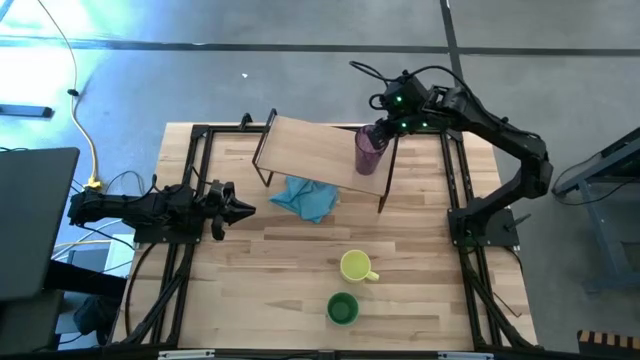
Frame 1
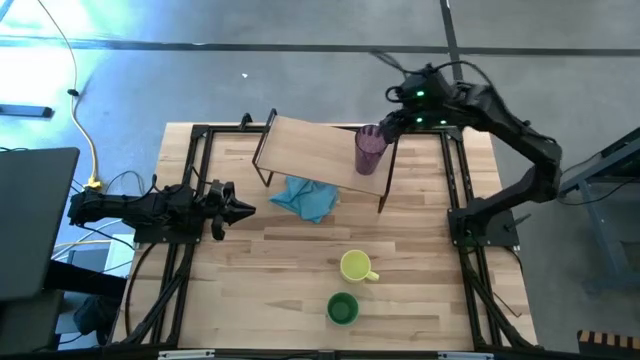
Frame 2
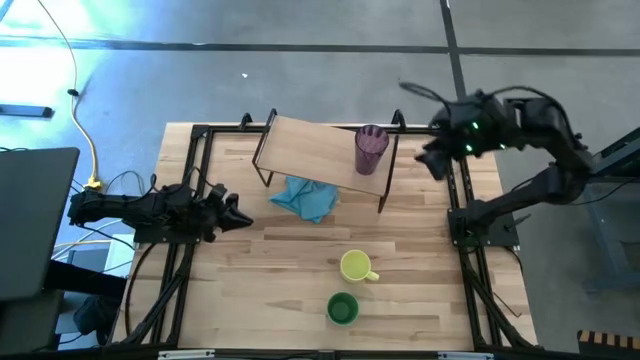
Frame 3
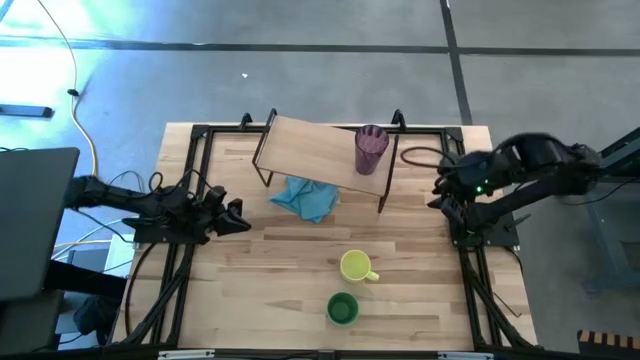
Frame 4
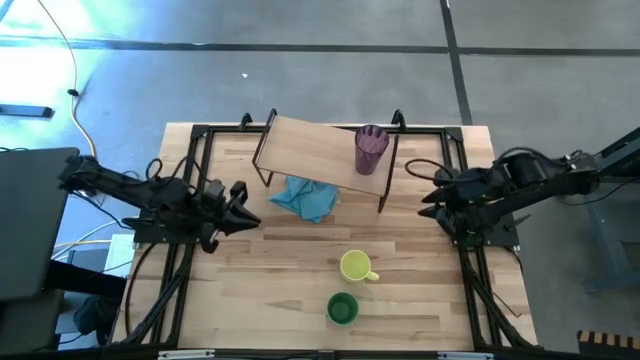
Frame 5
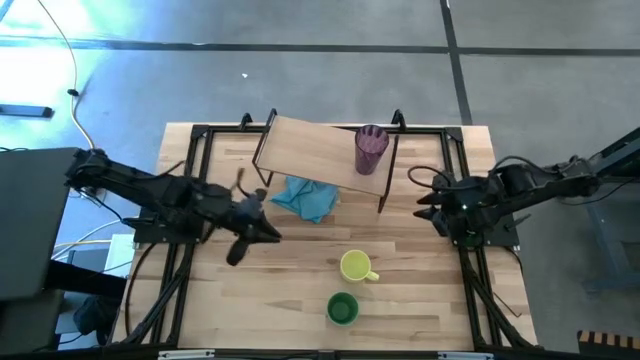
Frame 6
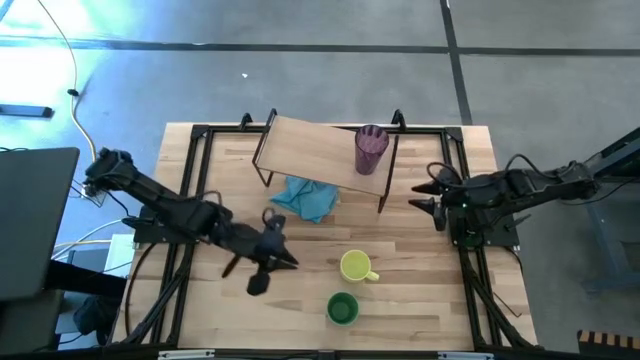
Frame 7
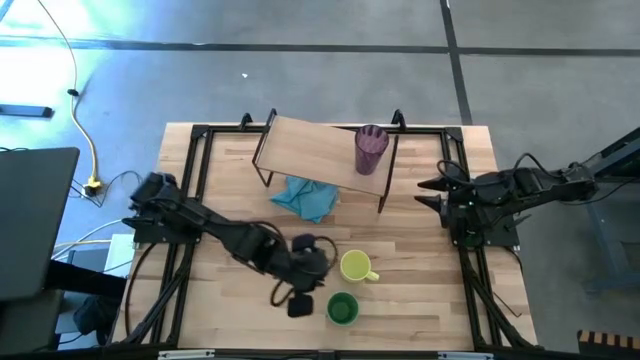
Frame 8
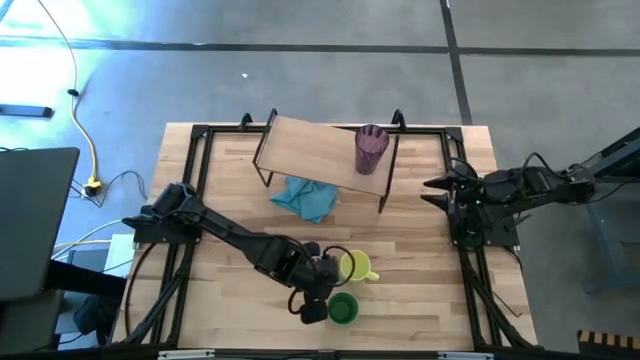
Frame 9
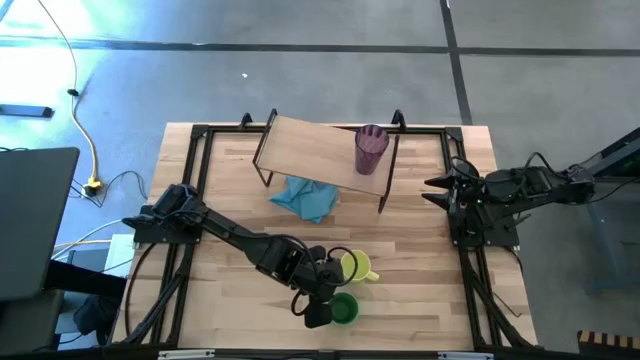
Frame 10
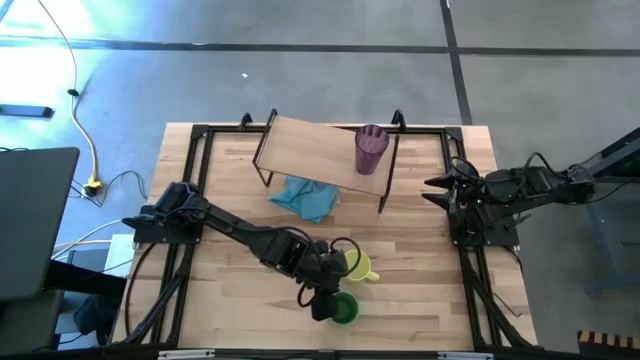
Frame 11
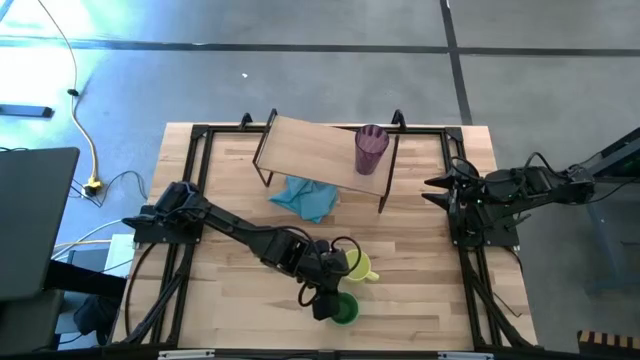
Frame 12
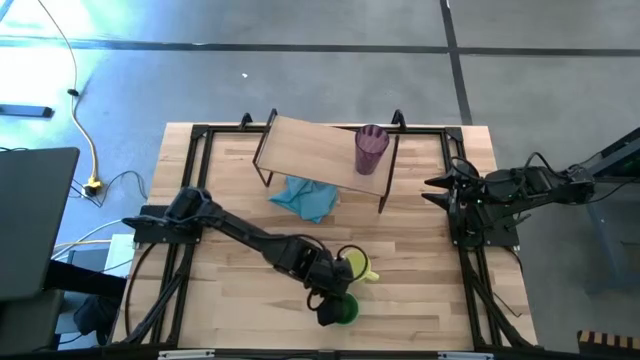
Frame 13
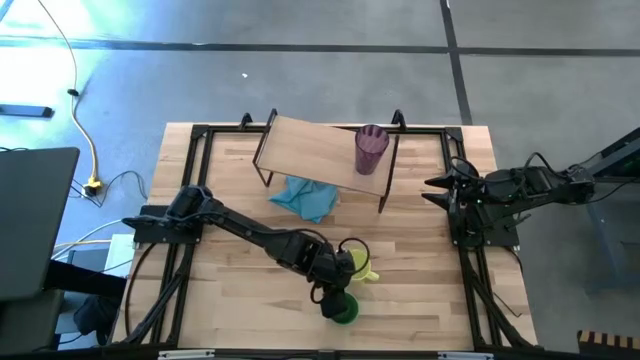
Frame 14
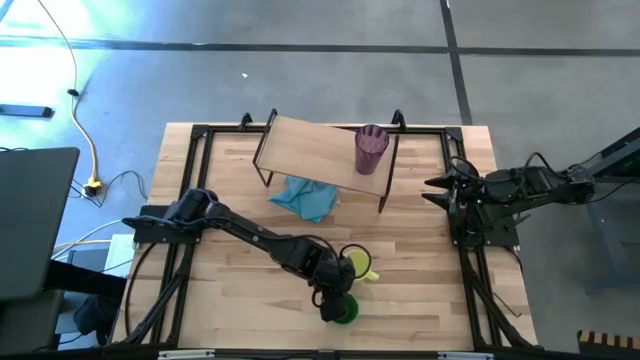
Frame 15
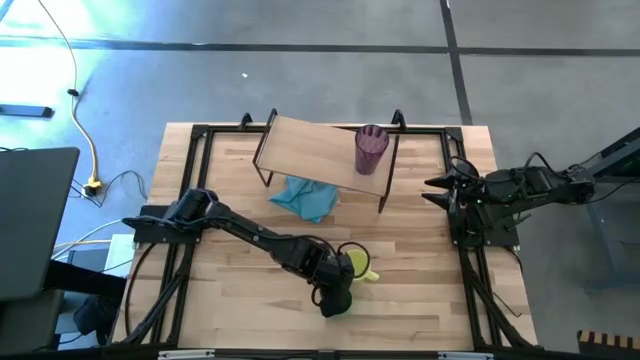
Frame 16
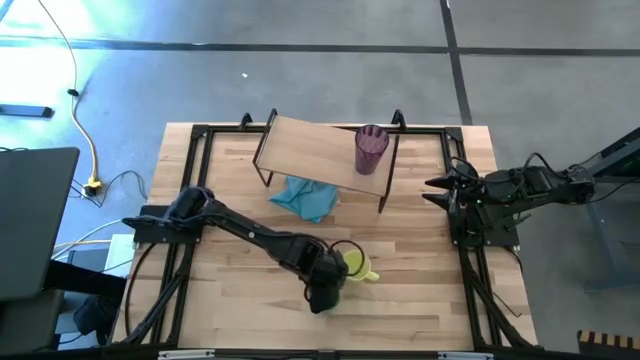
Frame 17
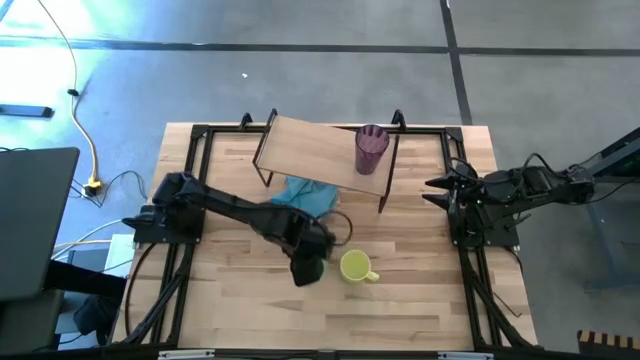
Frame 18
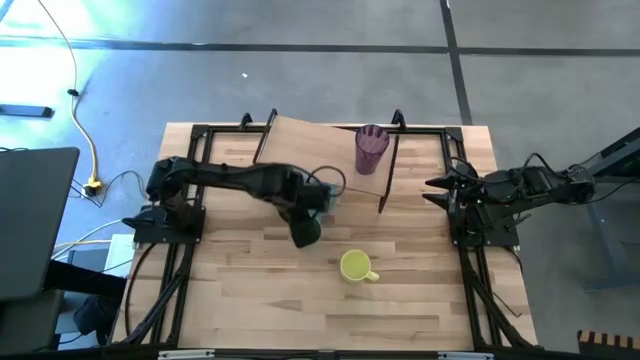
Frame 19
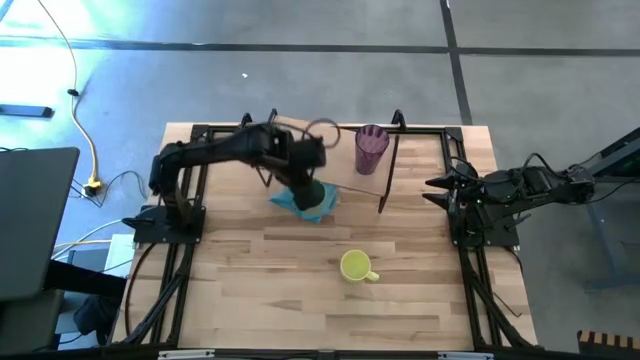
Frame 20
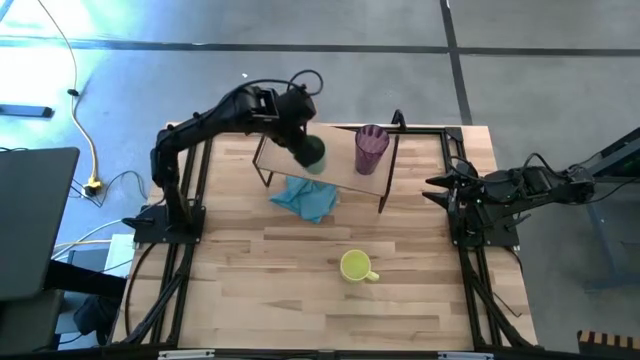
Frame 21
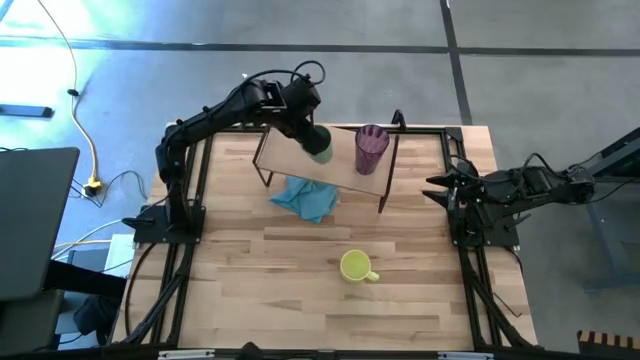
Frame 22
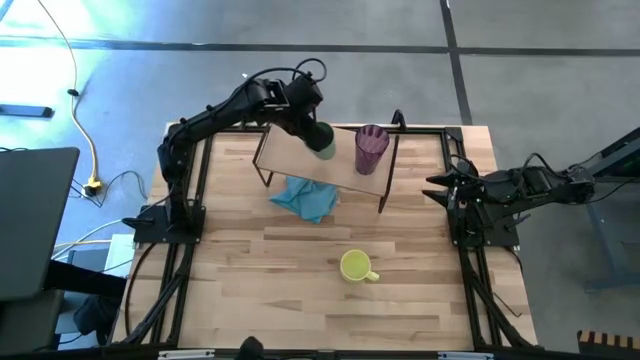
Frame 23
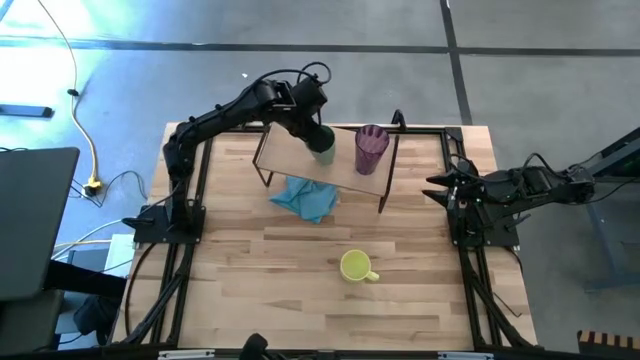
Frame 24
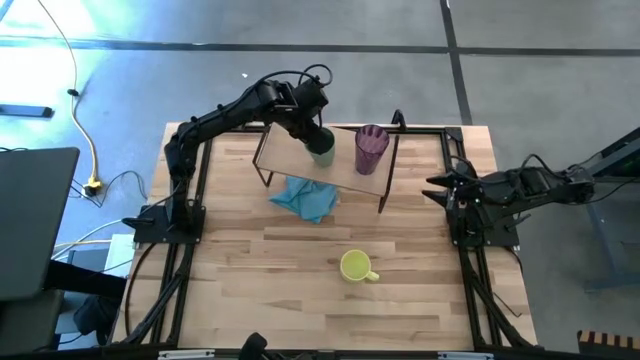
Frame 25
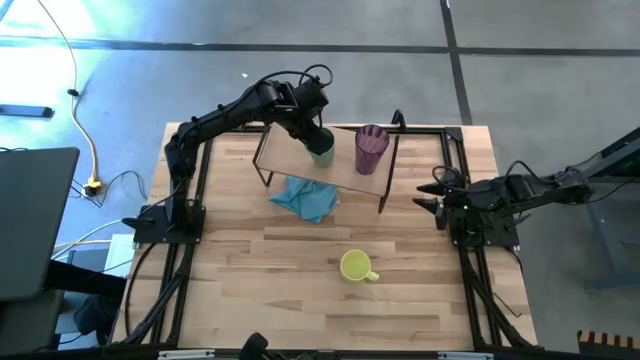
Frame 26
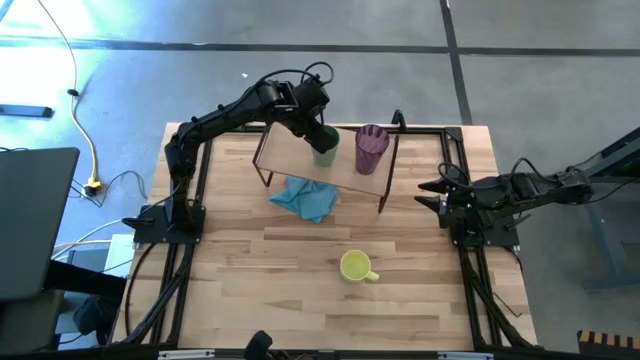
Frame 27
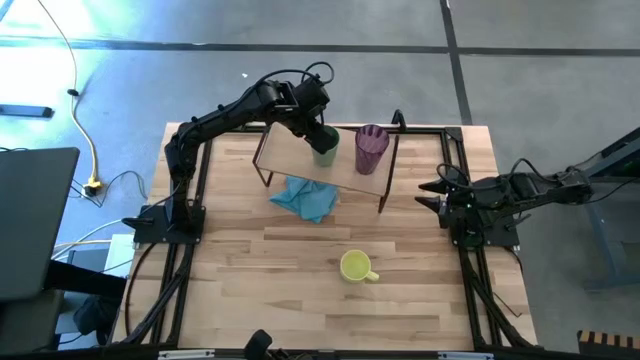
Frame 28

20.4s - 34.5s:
Task: Stack small to large cups/mugs on shelf
Put the green cup on the shelf

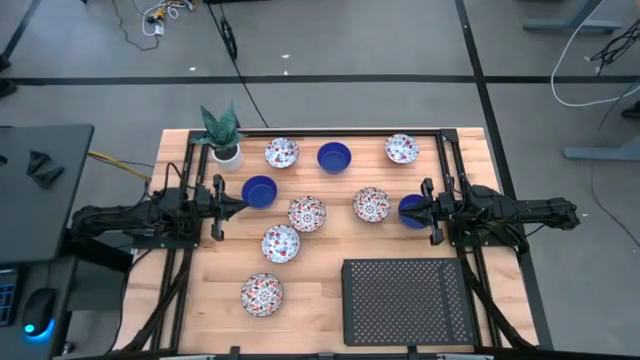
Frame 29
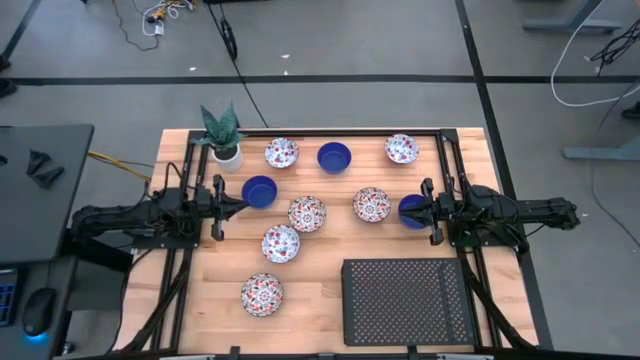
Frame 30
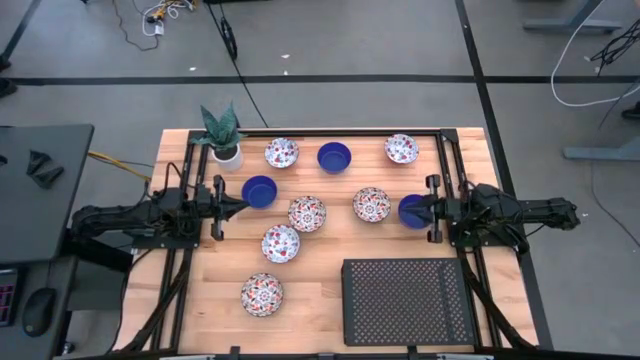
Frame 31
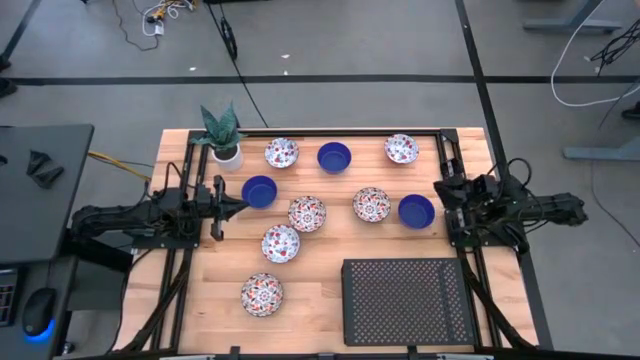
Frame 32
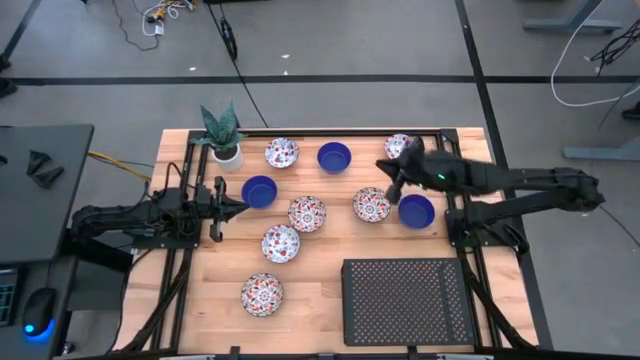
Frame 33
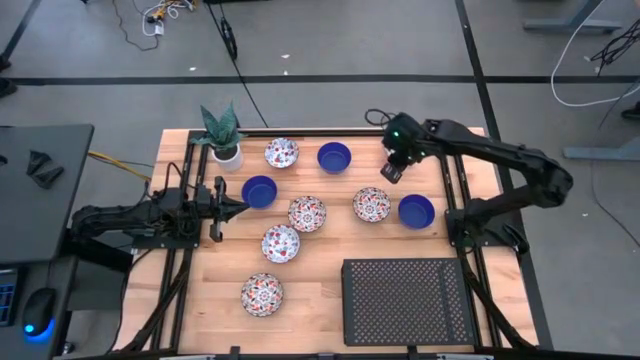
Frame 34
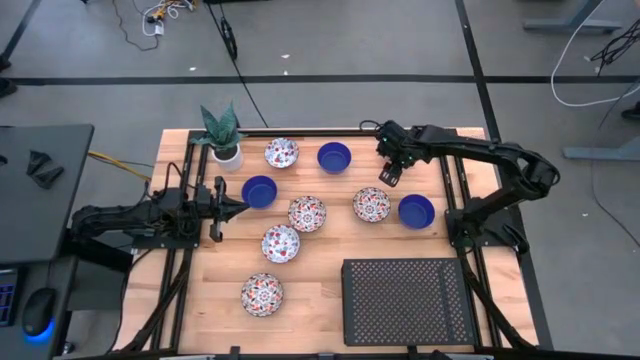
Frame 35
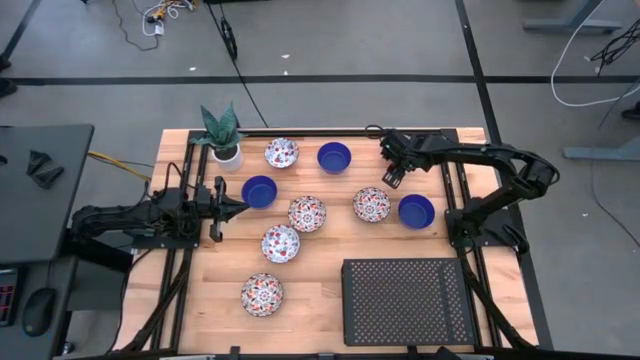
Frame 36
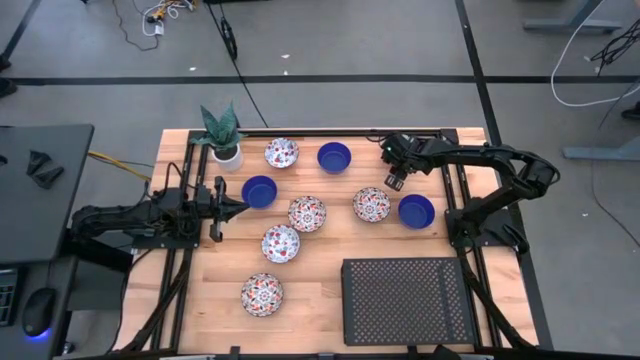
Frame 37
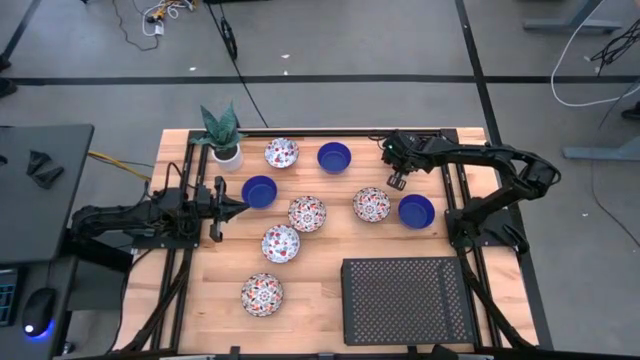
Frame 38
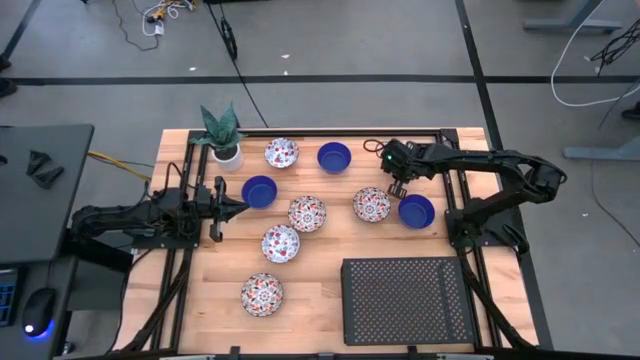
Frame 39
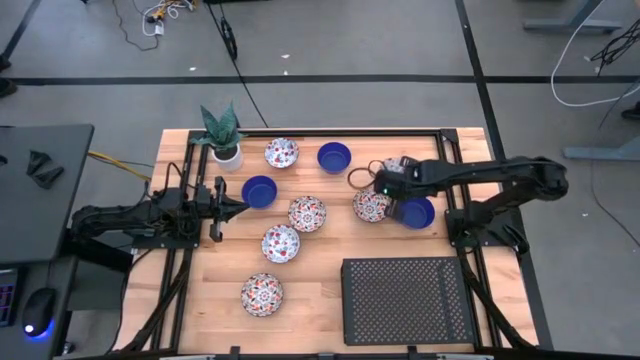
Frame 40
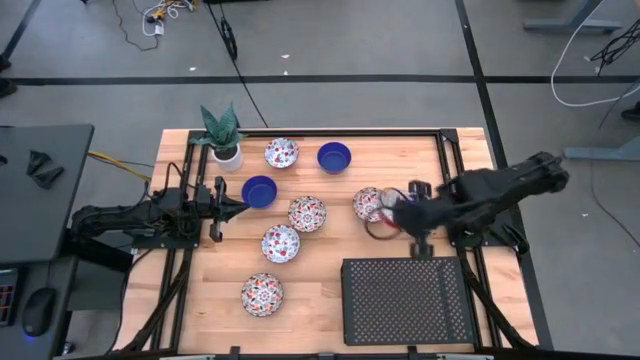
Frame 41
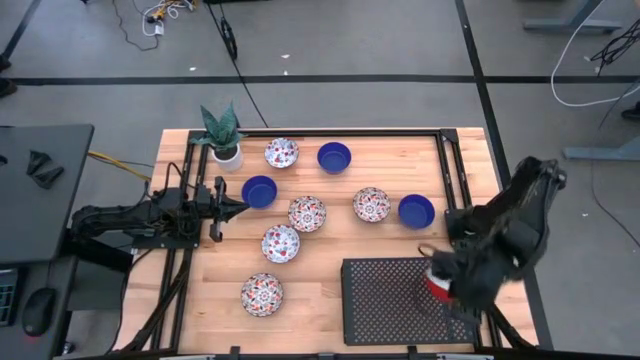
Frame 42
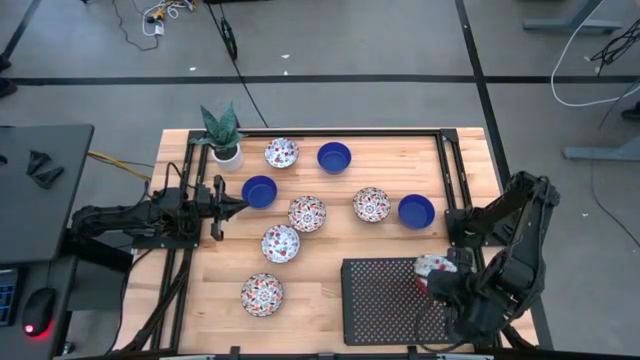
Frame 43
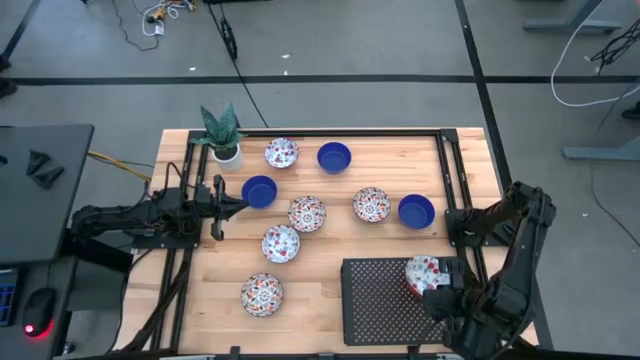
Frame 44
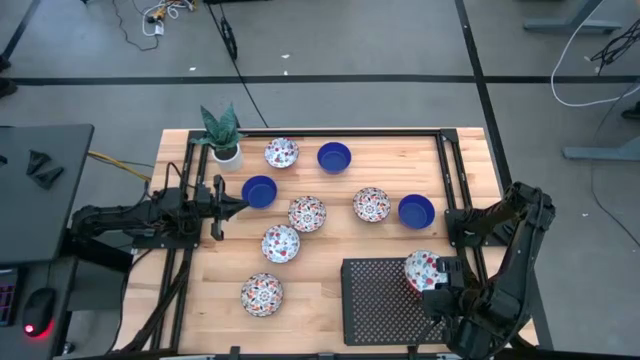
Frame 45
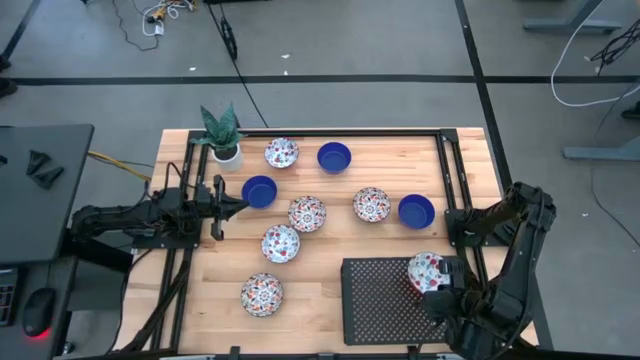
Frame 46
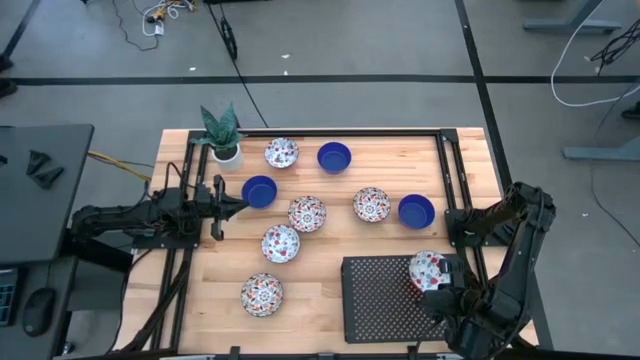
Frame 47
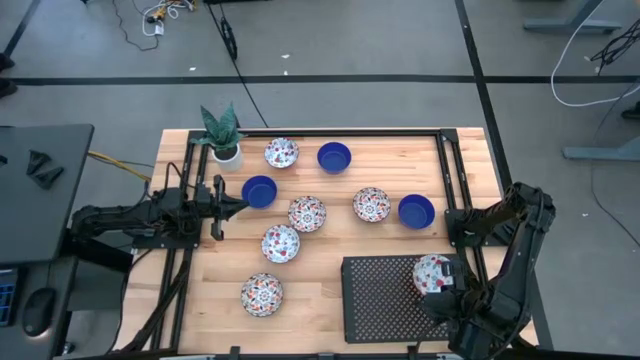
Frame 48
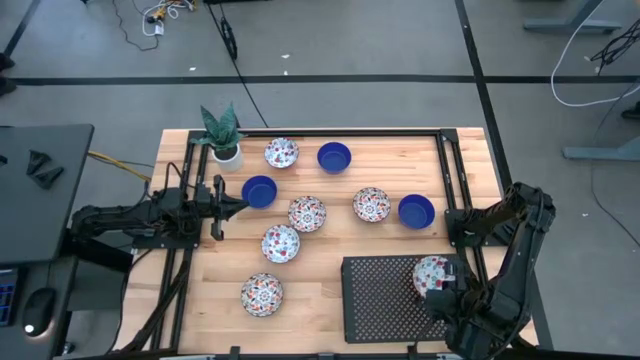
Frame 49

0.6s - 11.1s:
Task: Pick & Place Mini bowls
Put the top right white patterned bowl on the shelf
